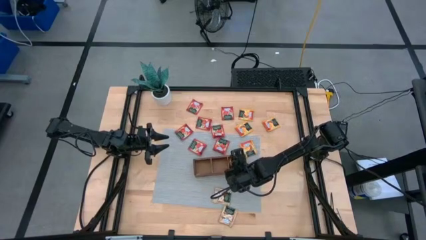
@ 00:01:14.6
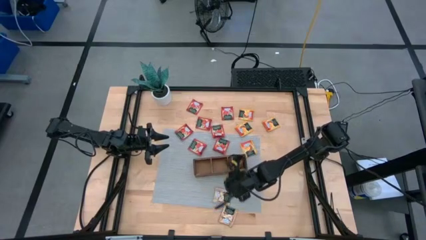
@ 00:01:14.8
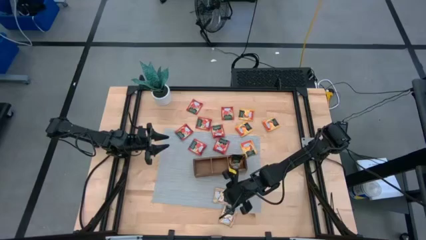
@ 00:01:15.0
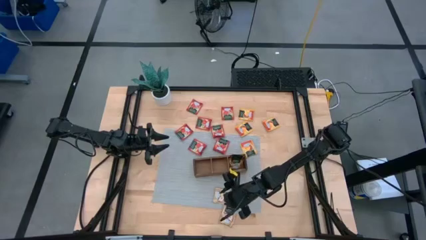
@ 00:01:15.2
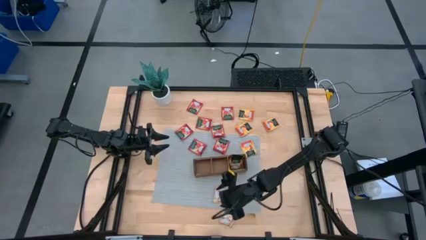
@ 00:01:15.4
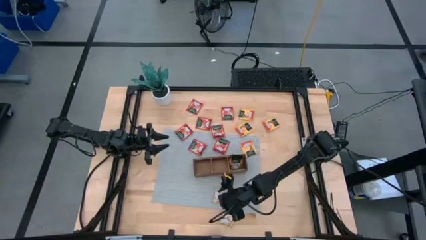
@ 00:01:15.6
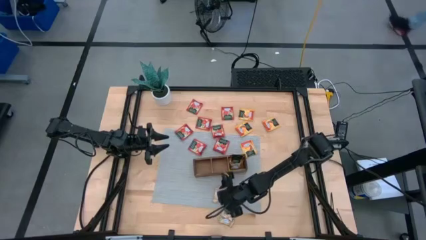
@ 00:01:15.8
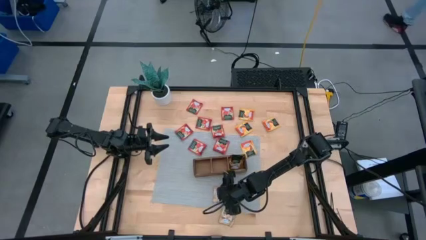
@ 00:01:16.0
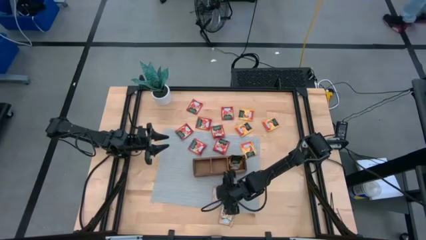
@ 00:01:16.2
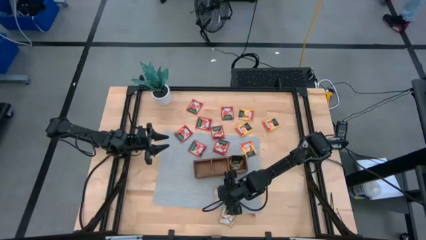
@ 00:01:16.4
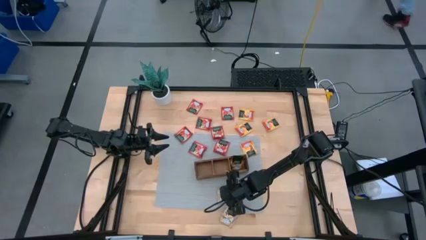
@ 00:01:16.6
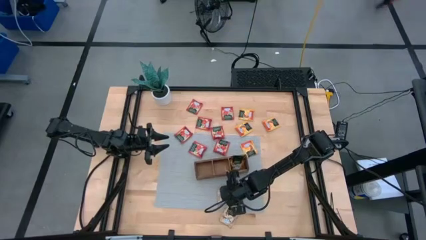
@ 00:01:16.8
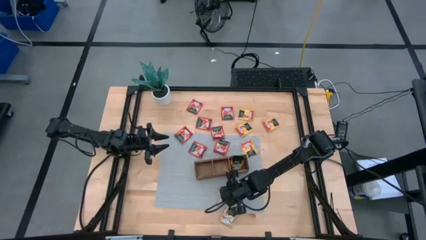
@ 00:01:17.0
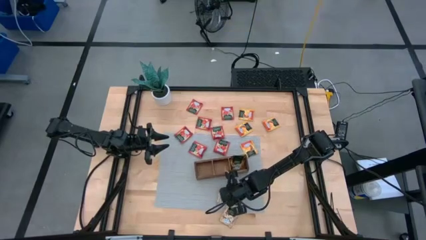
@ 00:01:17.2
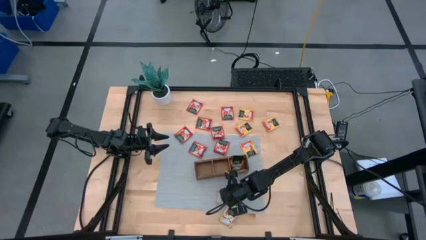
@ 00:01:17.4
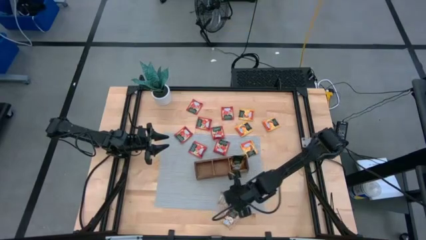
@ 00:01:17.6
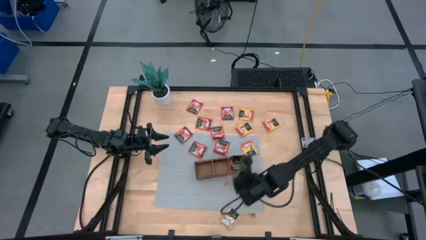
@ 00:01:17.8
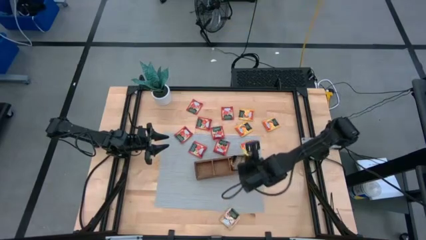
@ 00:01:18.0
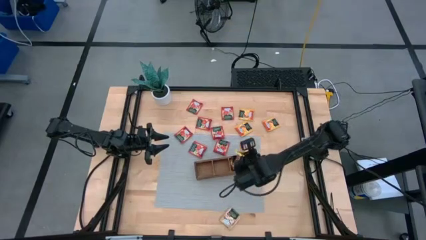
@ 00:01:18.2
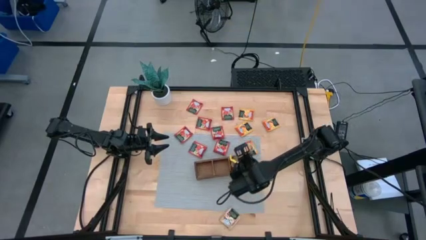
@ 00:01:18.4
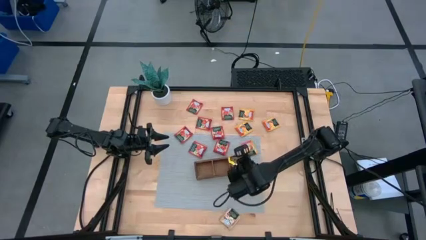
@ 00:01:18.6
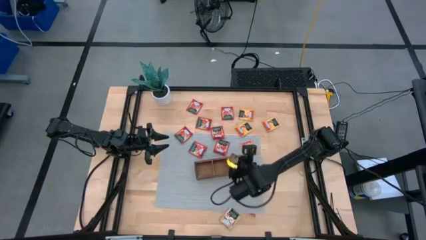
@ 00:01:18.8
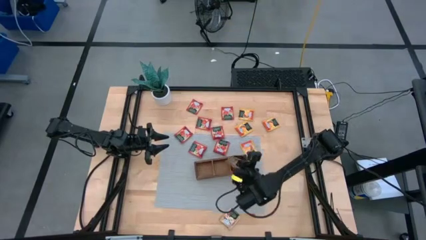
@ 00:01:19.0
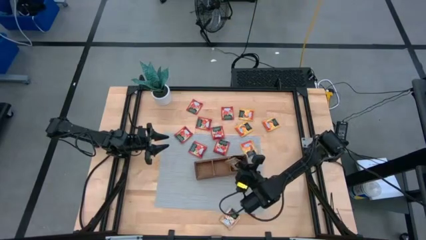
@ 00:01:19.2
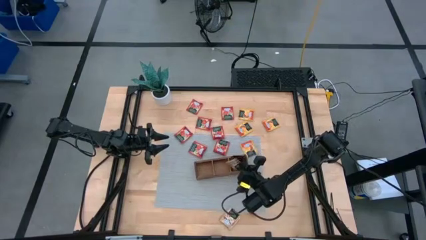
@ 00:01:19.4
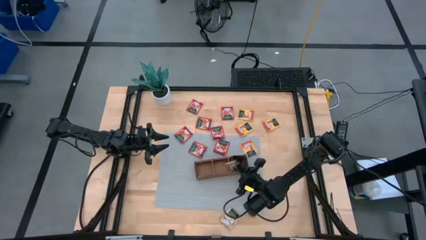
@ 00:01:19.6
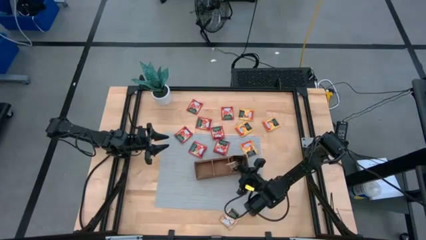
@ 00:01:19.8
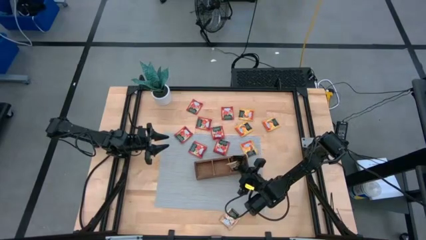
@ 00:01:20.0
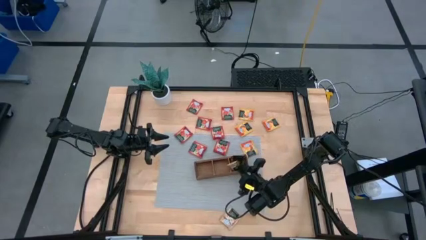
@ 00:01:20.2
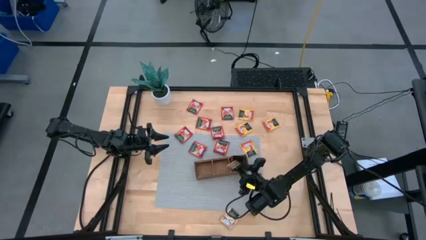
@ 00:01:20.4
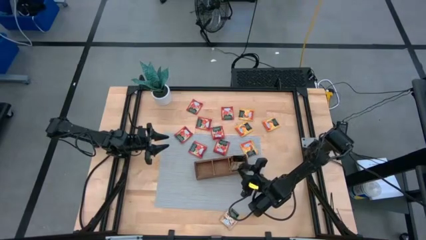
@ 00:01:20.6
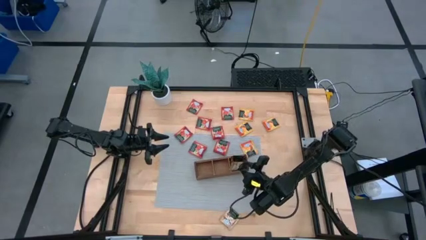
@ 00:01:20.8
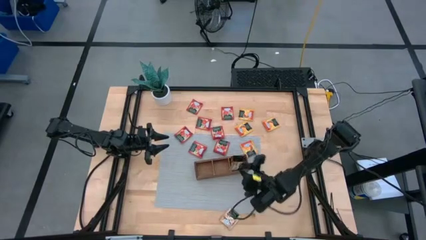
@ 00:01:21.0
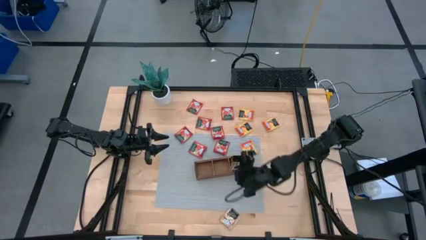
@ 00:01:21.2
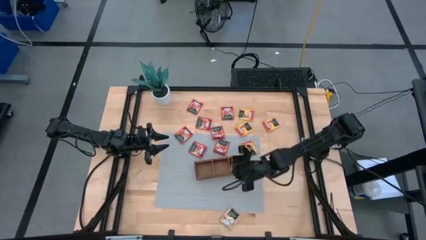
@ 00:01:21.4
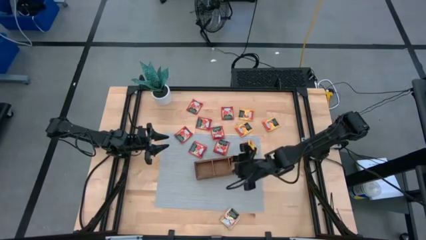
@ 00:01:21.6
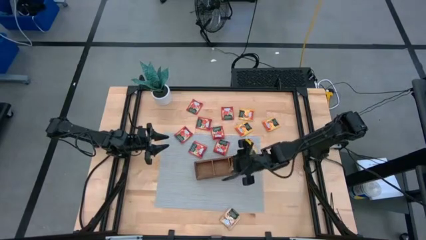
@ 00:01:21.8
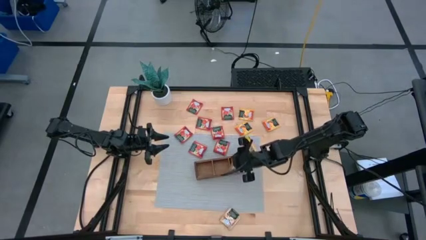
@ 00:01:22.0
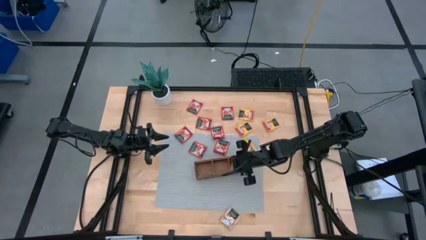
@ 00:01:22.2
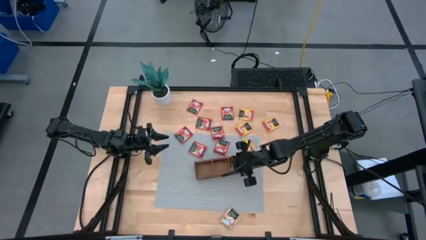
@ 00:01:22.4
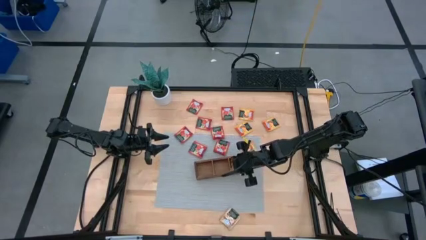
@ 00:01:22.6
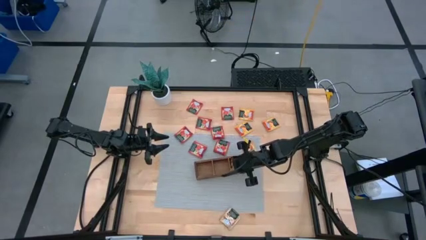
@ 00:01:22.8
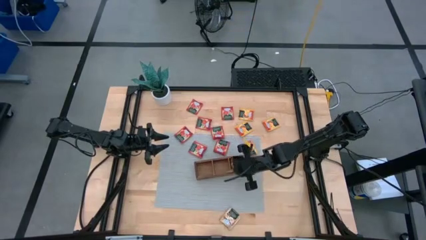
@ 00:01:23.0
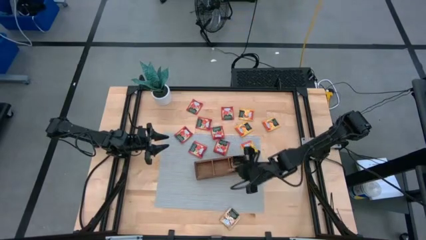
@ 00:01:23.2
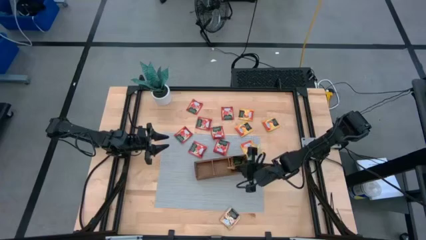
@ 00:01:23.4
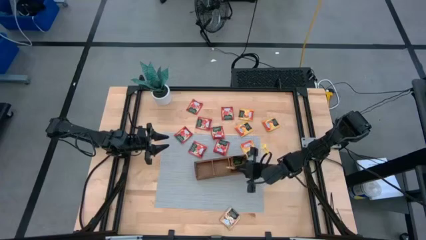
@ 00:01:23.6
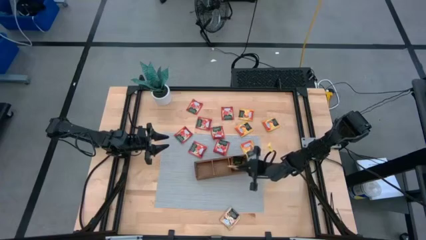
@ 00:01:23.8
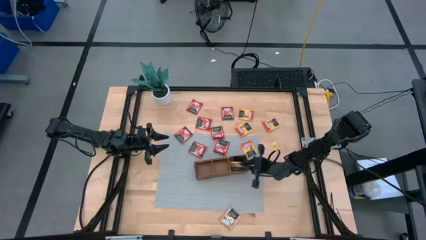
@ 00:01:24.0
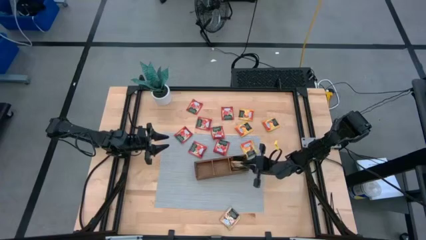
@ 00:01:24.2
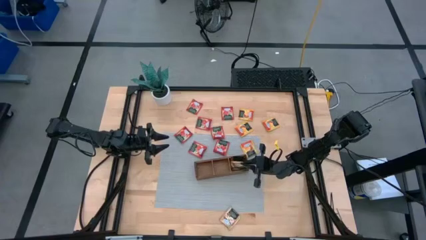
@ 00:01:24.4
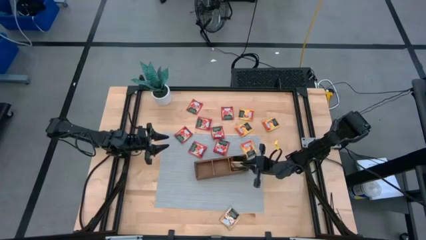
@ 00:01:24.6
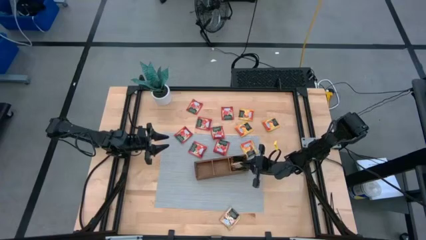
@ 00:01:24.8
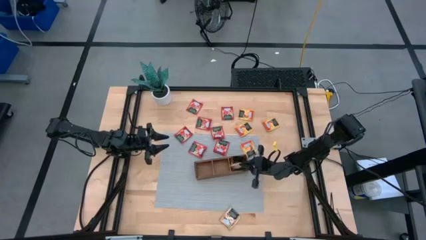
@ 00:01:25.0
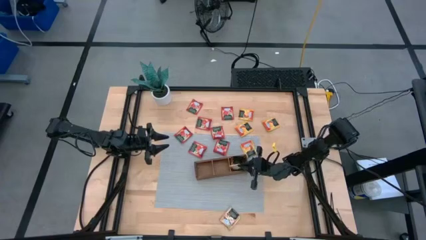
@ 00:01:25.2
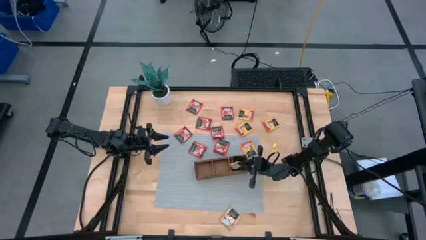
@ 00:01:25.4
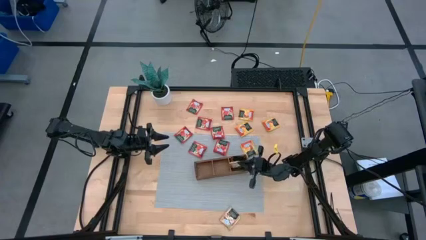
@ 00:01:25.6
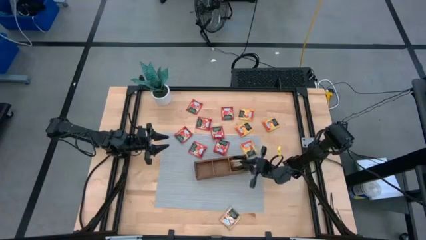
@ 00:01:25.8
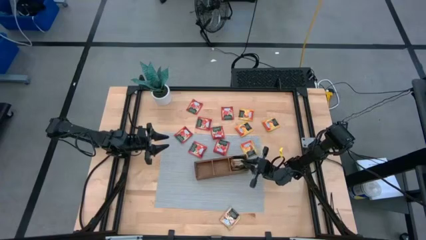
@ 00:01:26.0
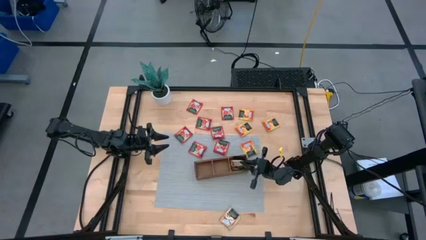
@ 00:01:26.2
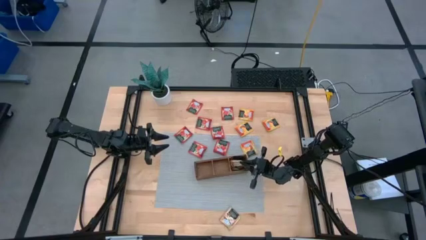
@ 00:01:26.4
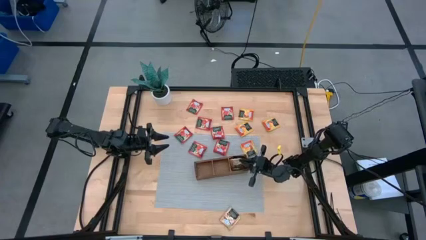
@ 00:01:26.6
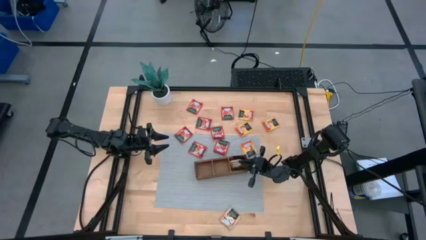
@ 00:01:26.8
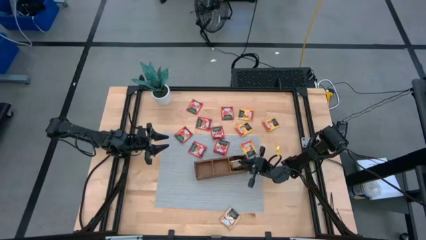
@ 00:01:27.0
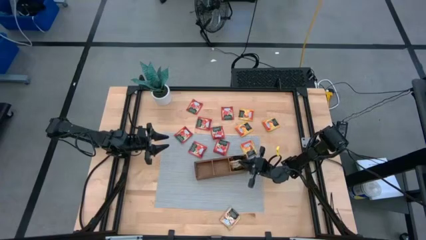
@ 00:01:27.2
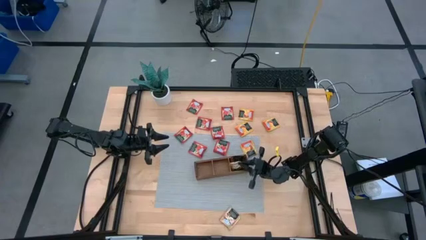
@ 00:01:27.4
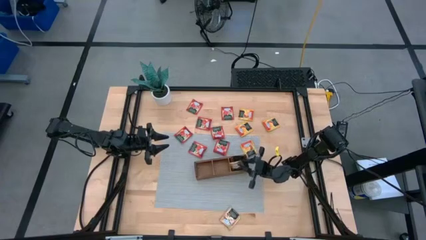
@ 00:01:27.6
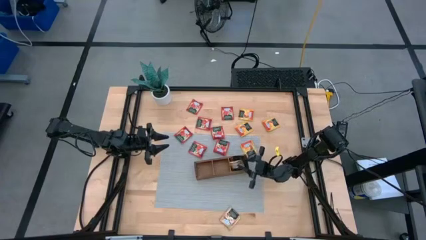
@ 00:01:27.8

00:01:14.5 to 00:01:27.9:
Task: Pick & Place Tea
Put the brown tea bag into the right compartment of the wood organizer

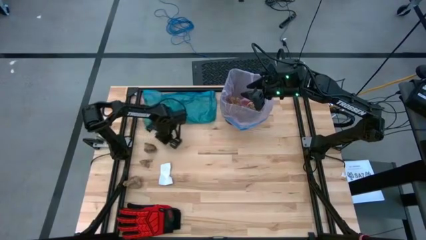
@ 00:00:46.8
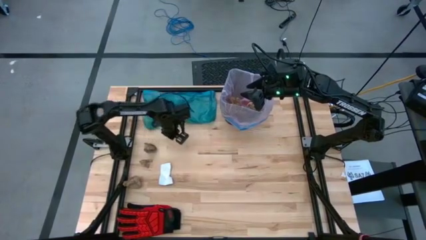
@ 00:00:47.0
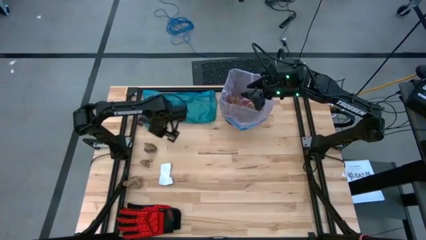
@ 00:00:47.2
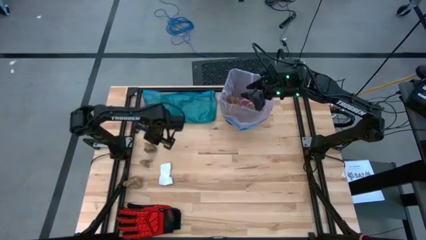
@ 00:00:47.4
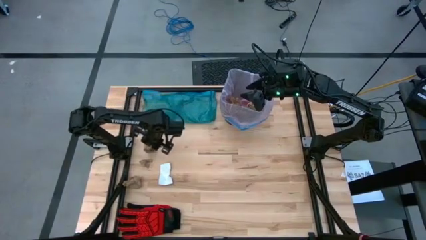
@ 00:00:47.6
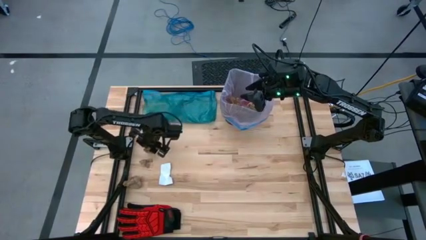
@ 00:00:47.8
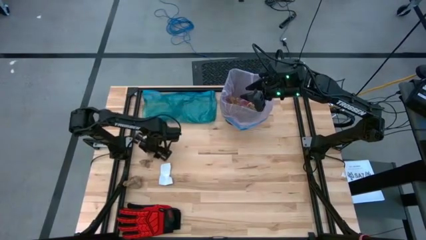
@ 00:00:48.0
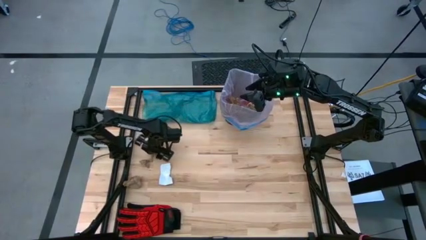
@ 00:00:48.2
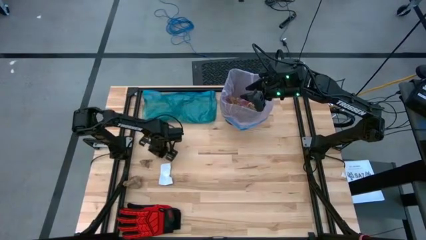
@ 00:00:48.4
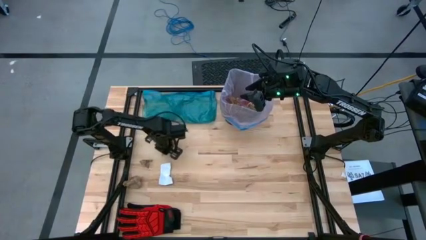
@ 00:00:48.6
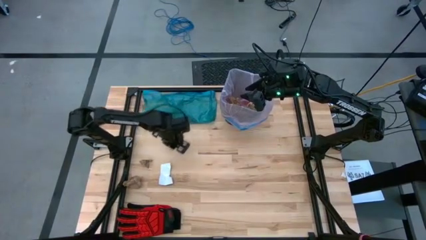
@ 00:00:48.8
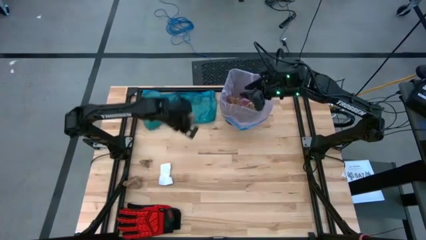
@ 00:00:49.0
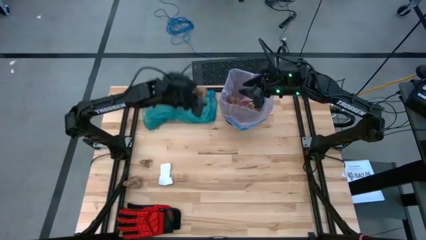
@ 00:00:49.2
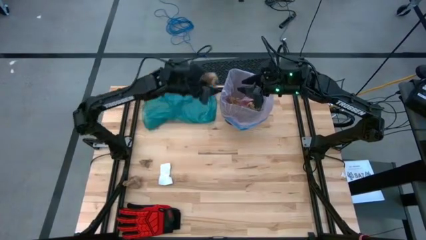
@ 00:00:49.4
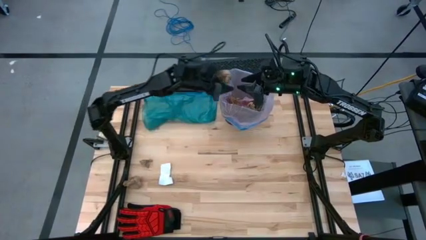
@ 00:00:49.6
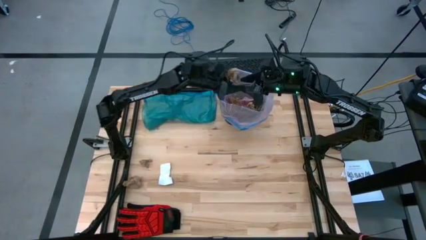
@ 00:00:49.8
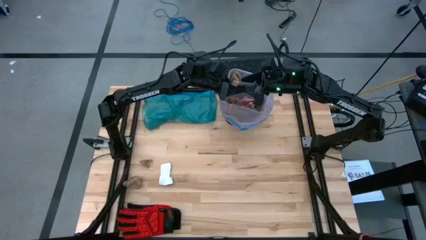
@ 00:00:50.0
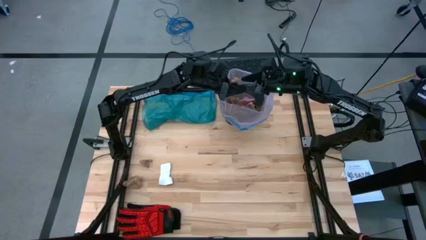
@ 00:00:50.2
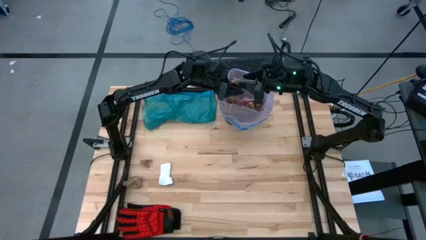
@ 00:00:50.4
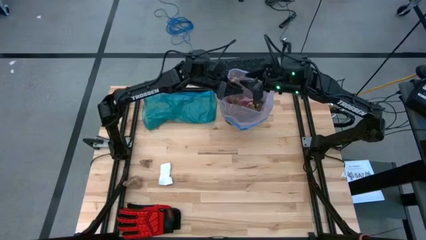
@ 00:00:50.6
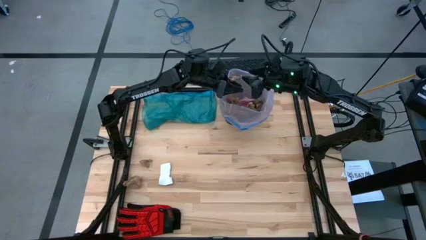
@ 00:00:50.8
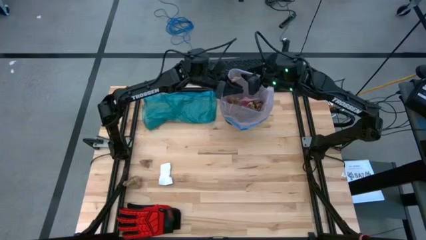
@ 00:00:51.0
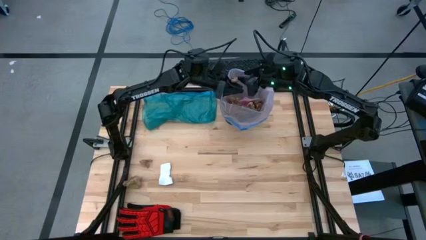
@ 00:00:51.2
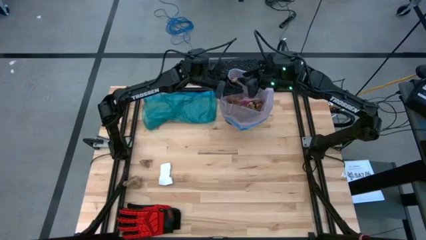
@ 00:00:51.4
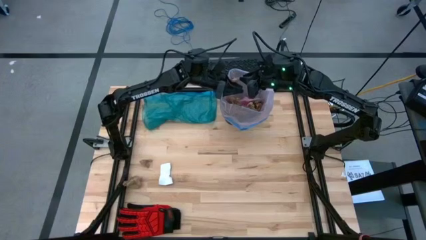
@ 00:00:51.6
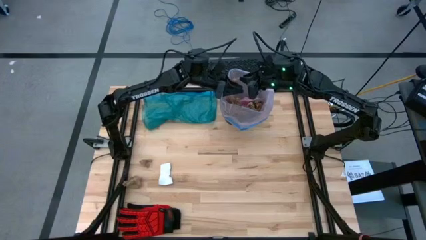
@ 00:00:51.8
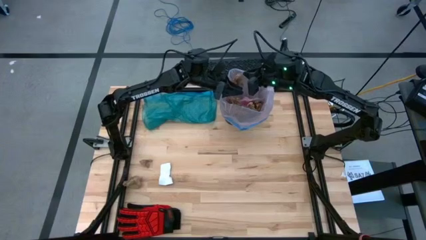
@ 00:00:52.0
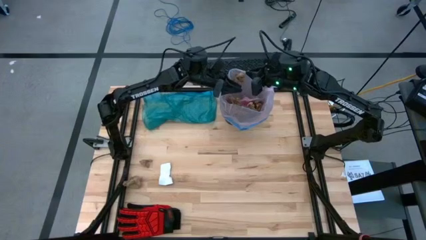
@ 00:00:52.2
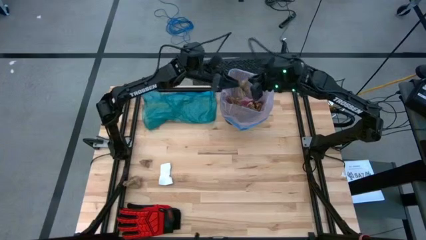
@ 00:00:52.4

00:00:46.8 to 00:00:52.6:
Task: place trash/remove bag and relplace
Put the brown paper into the black trash bin
